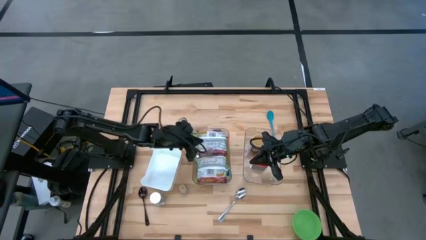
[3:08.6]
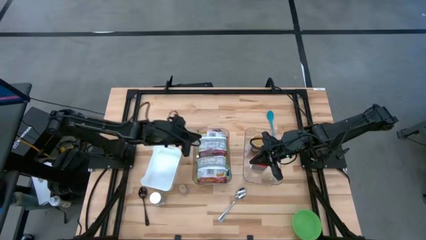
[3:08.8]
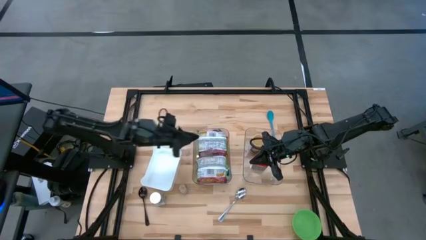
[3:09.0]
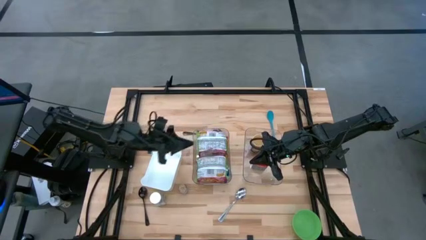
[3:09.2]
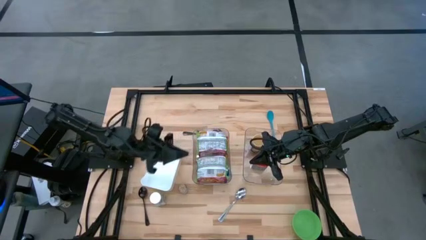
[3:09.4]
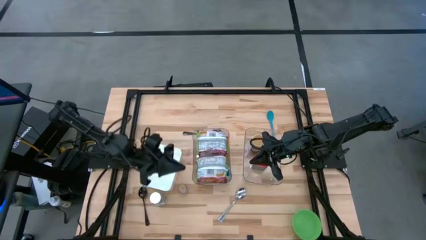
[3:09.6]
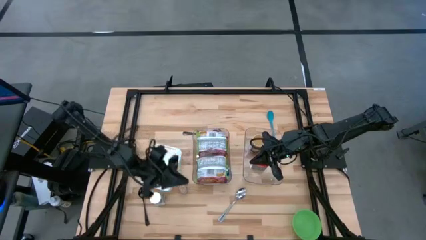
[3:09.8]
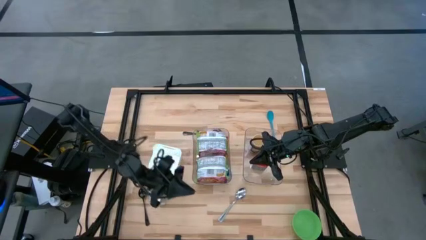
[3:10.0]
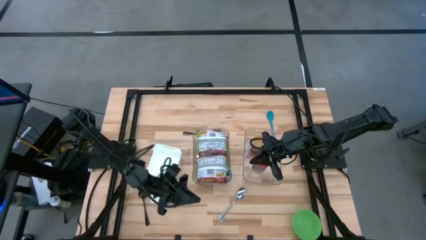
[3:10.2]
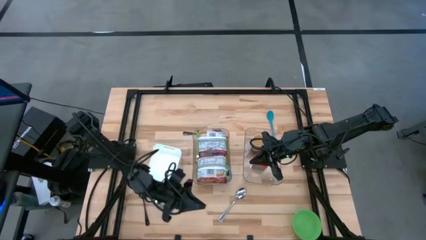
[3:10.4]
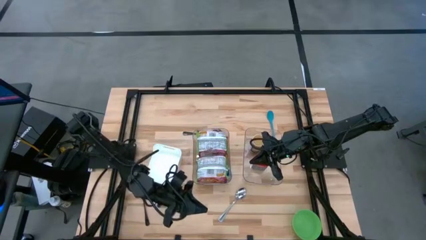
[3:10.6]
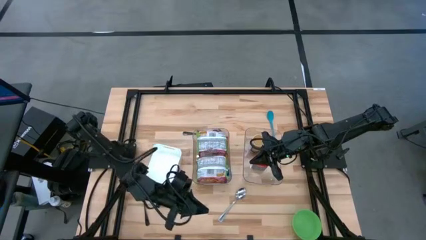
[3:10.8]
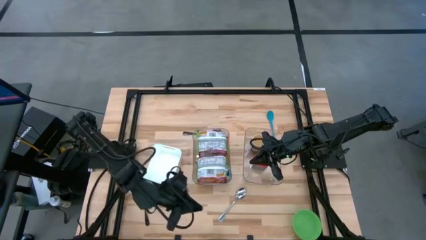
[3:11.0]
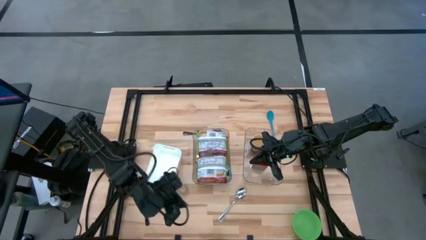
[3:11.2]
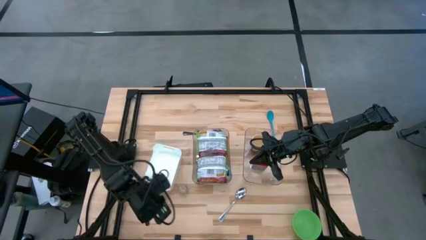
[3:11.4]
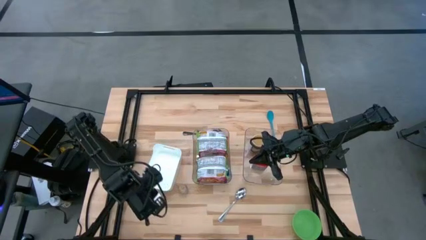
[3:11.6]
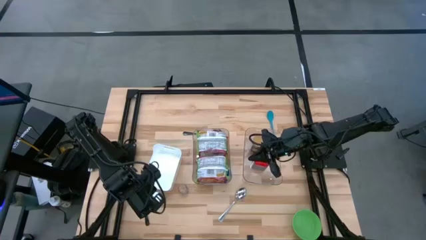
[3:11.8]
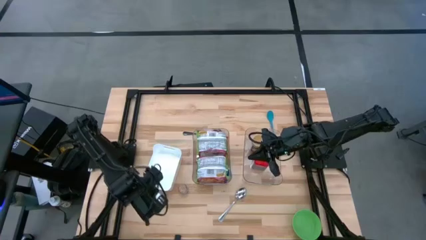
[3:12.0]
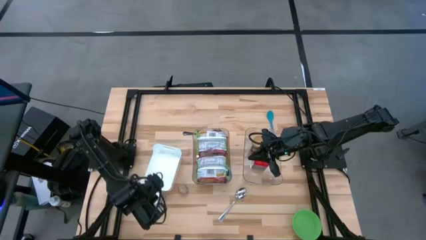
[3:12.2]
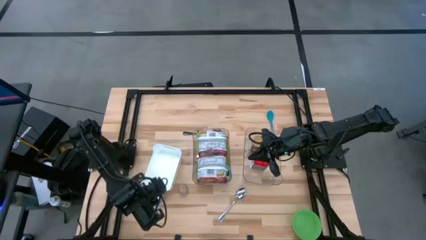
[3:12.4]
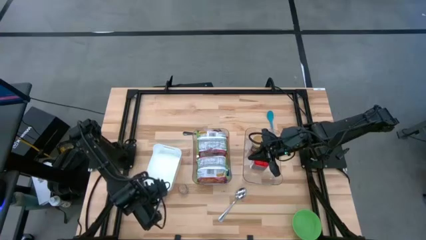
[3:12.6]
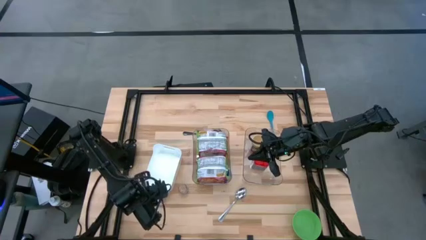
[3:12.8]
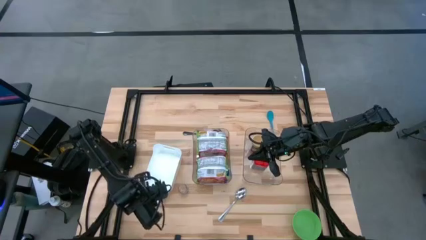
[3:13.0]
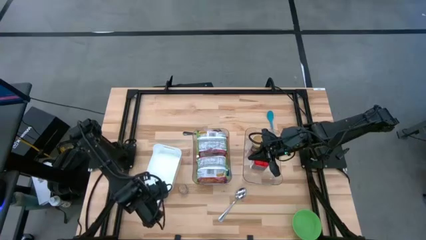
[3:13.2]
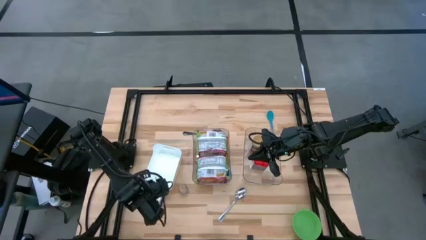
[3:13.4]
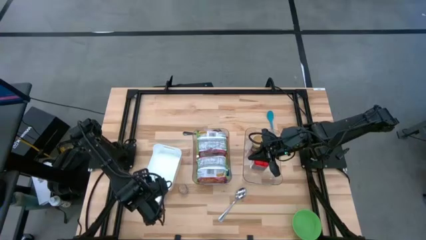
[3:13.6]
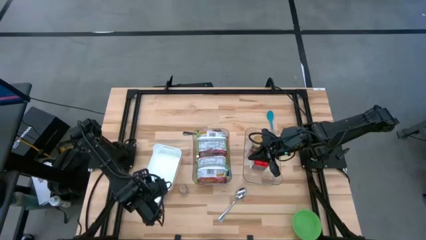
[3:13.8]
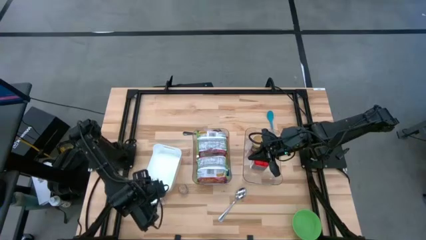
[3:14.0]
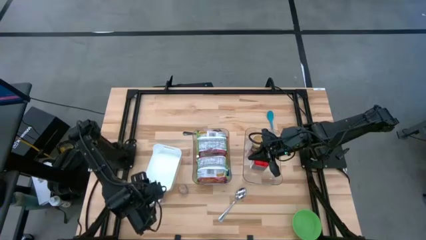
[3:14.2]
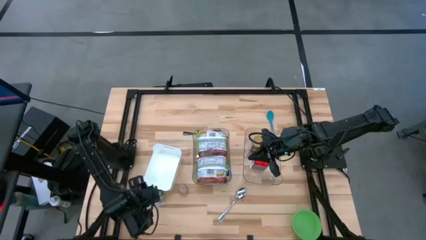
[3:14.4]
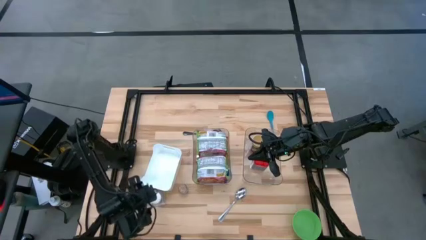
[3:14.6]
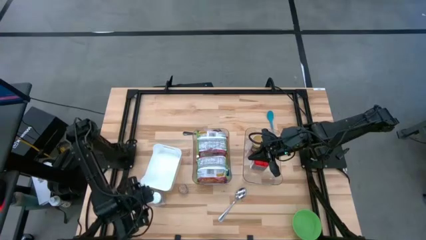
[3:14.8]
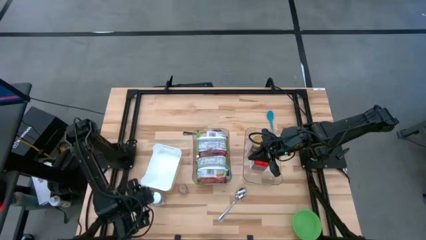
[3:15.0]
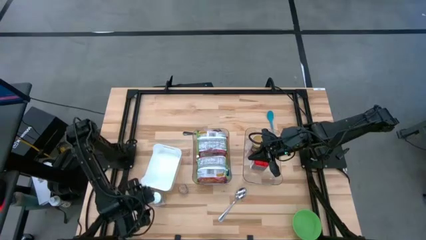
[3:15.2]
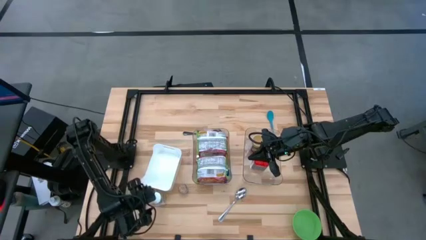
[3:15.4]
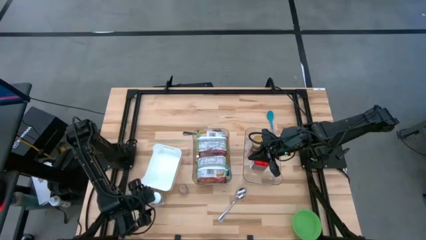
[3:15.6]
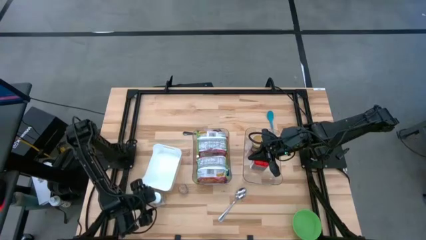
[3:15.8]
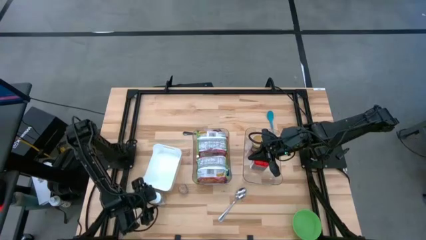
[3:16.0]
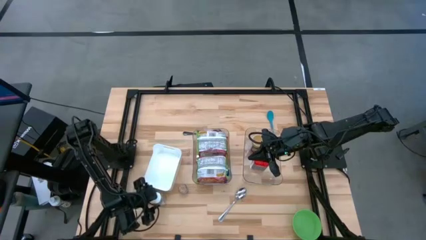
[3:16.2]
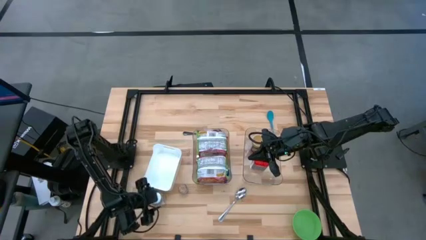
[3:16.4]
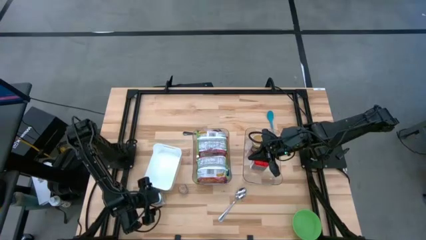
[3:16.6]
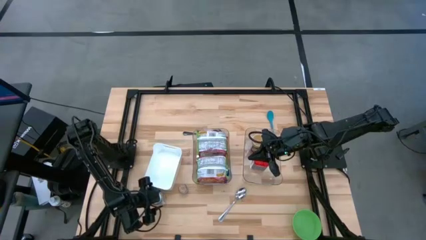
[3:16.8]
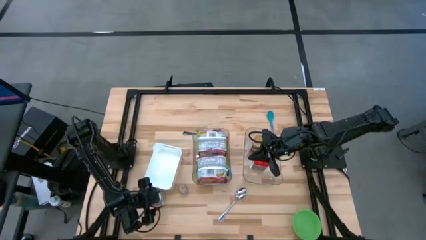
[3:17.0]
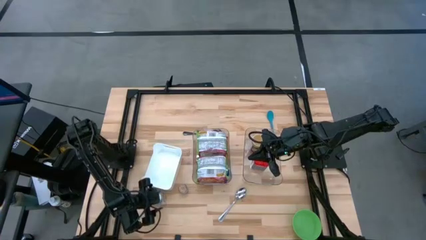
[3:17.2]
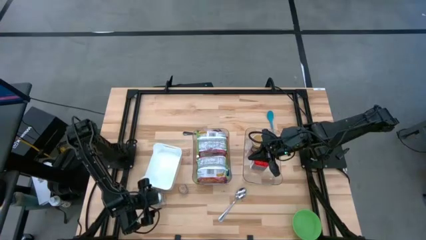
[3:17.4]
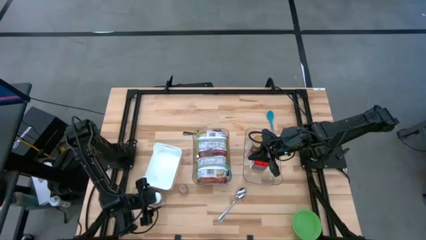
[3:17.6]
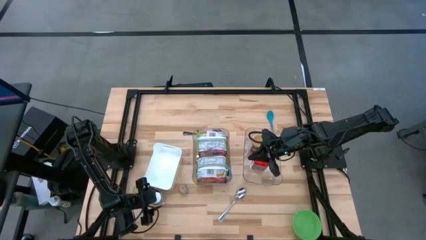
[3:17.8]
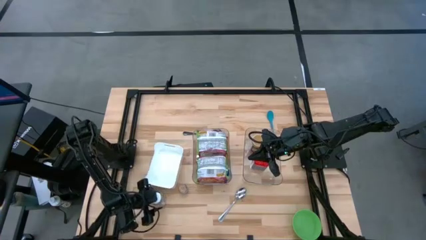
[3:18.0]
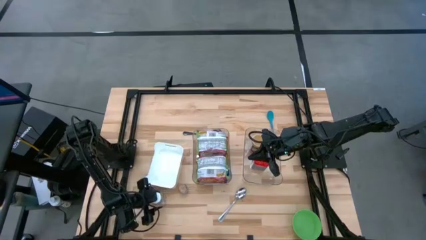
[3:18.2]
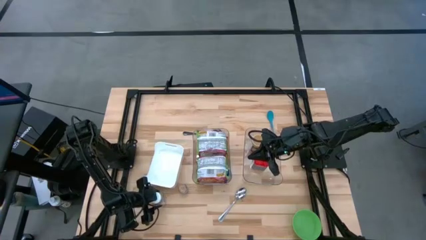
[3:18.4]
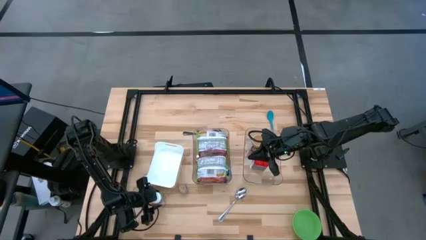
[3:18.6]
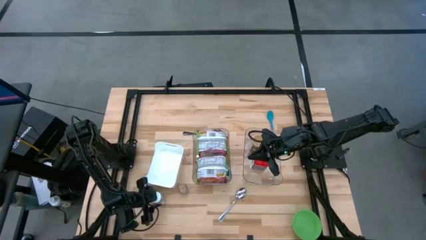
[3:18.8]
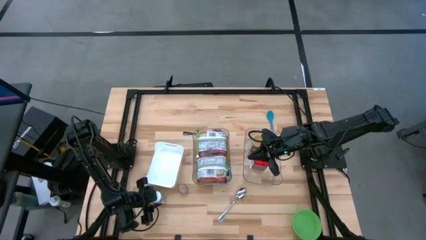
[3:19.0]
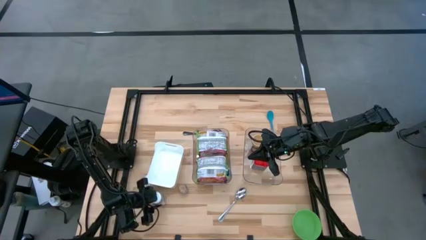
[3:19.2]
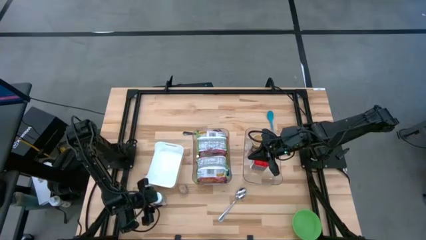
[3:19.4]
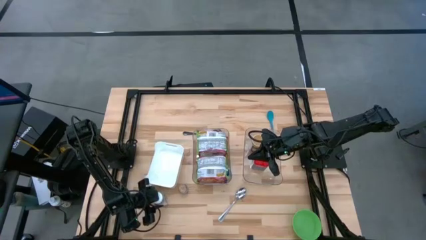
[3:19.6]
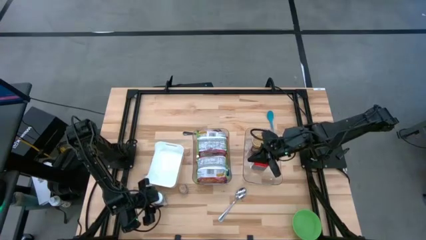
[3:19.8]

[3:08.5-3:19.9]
Task: Pick & Place Food Item
Put the white spice bottle into the right transparent bin
